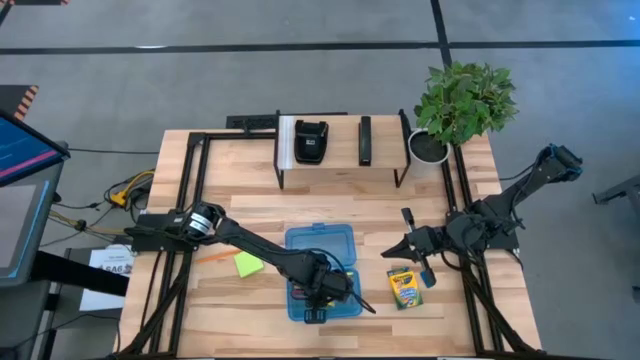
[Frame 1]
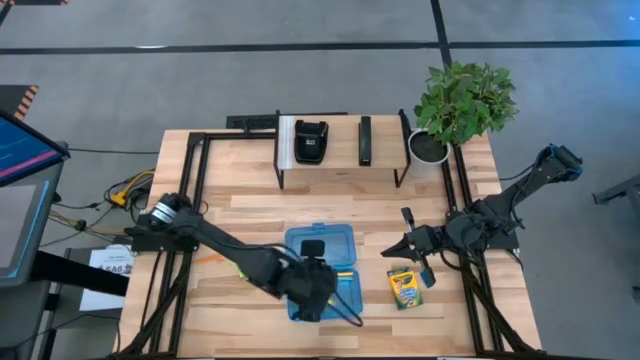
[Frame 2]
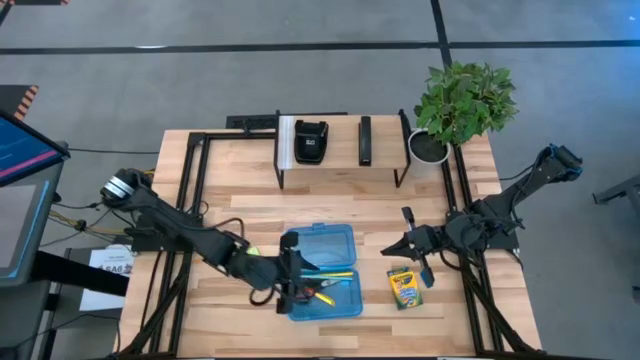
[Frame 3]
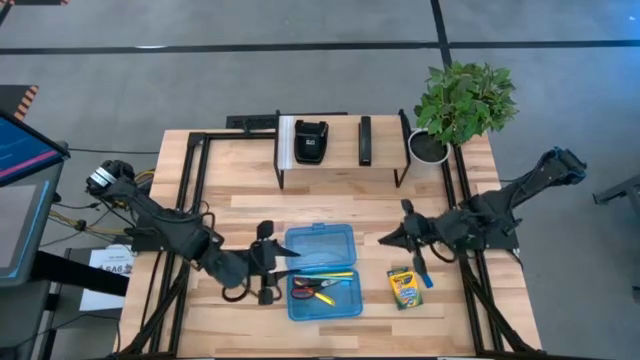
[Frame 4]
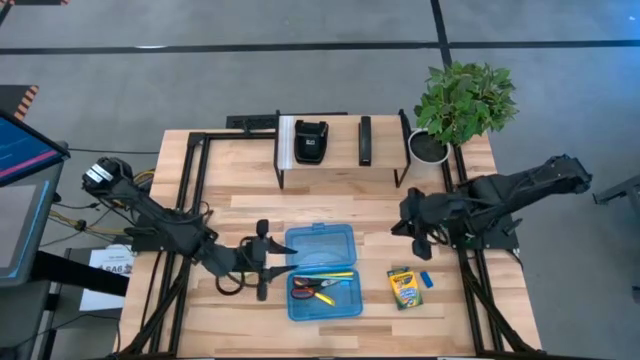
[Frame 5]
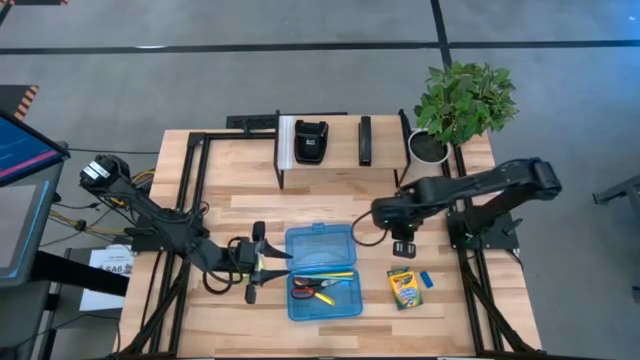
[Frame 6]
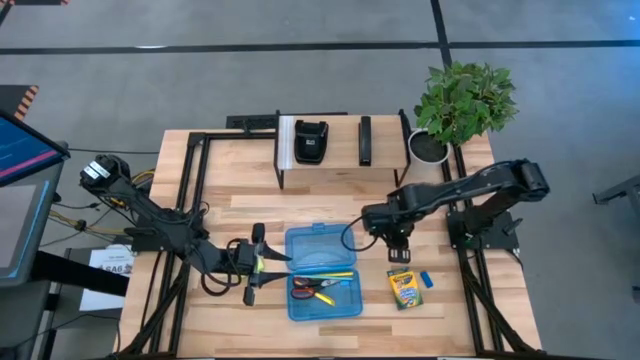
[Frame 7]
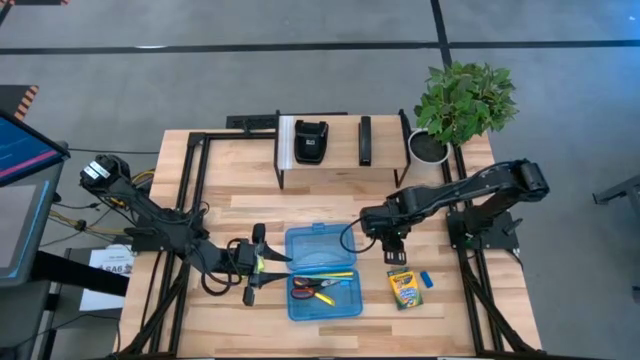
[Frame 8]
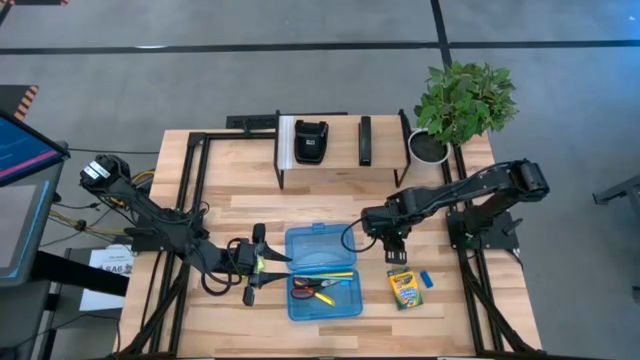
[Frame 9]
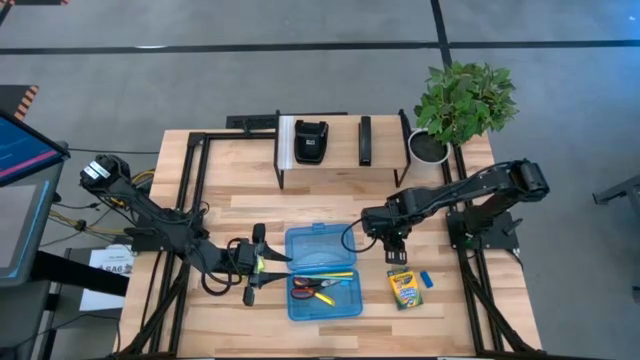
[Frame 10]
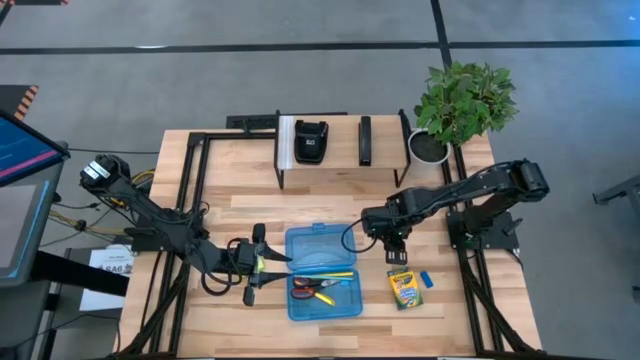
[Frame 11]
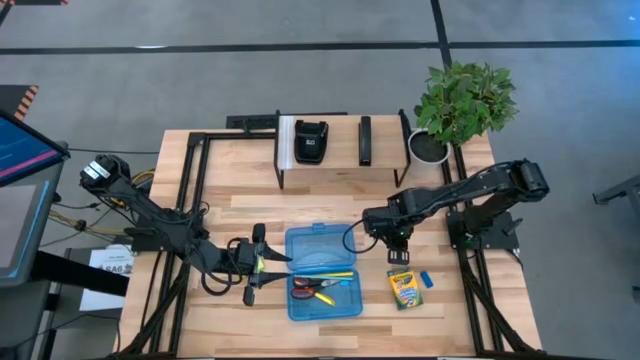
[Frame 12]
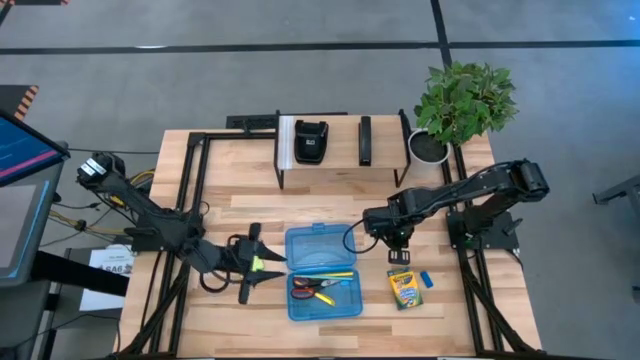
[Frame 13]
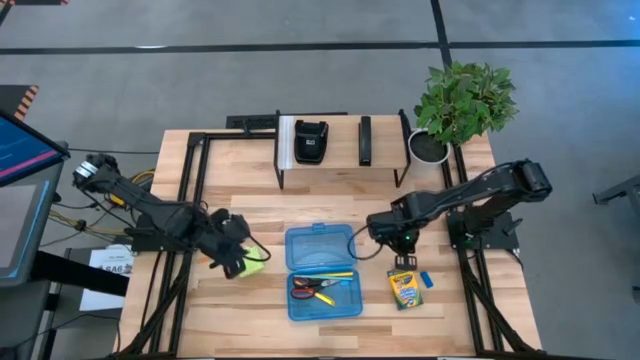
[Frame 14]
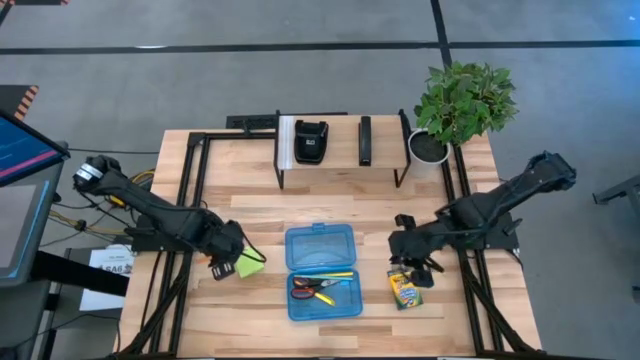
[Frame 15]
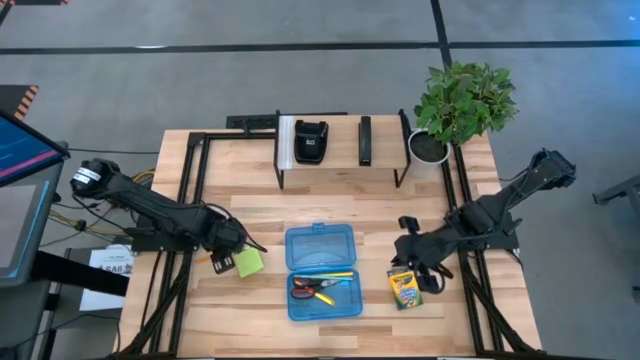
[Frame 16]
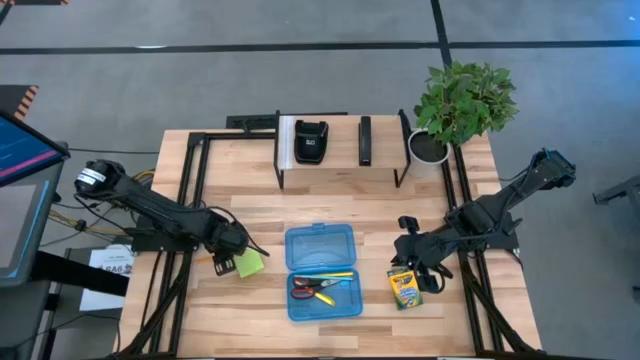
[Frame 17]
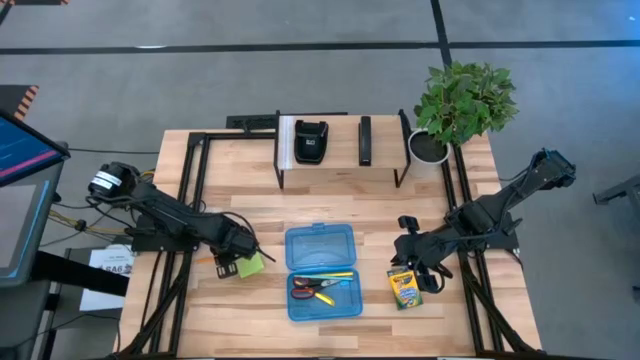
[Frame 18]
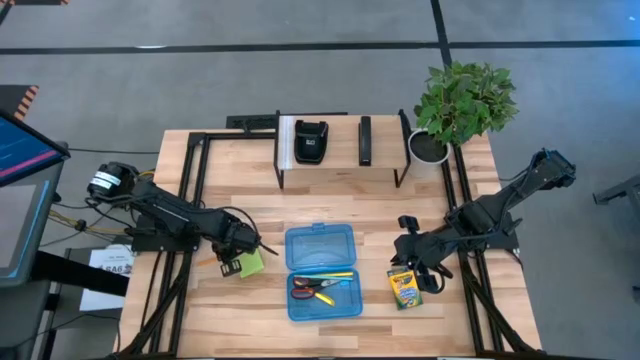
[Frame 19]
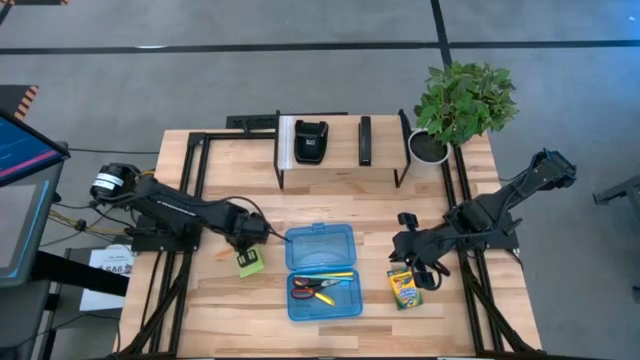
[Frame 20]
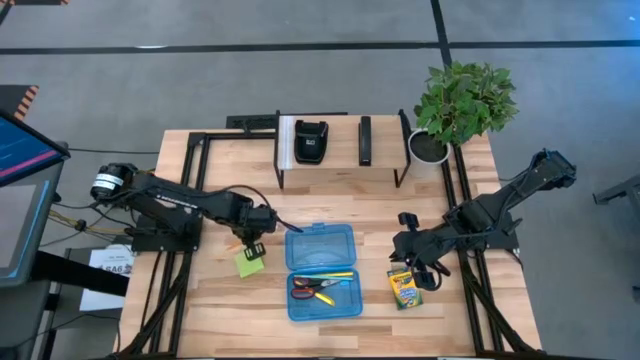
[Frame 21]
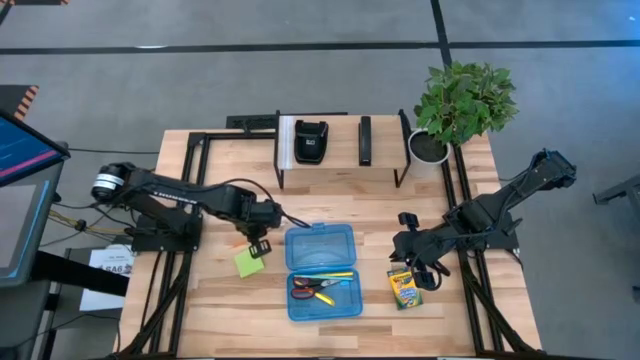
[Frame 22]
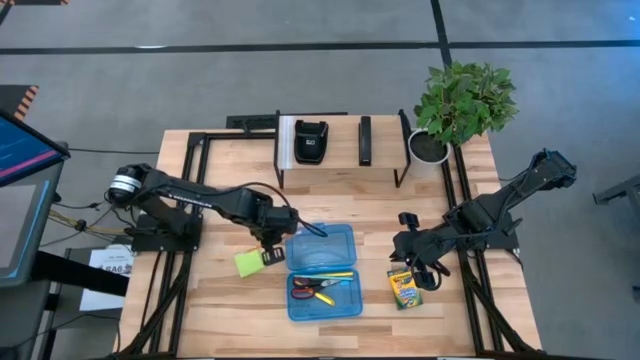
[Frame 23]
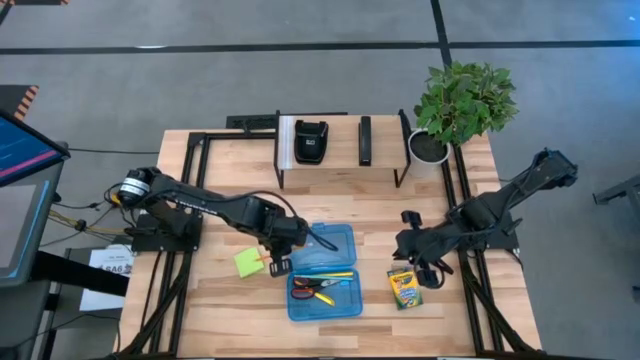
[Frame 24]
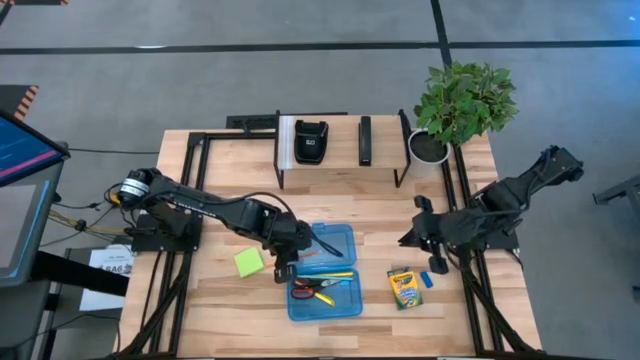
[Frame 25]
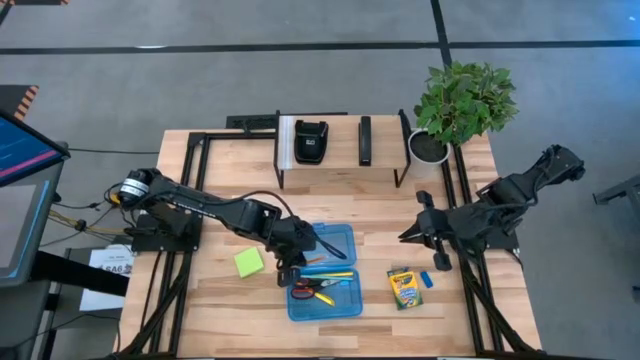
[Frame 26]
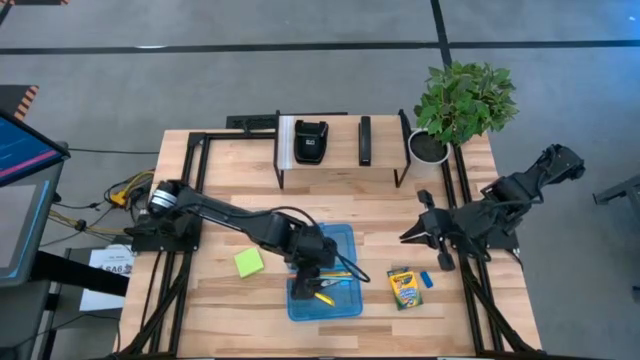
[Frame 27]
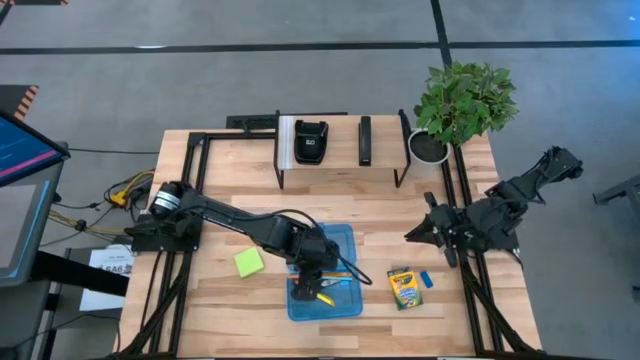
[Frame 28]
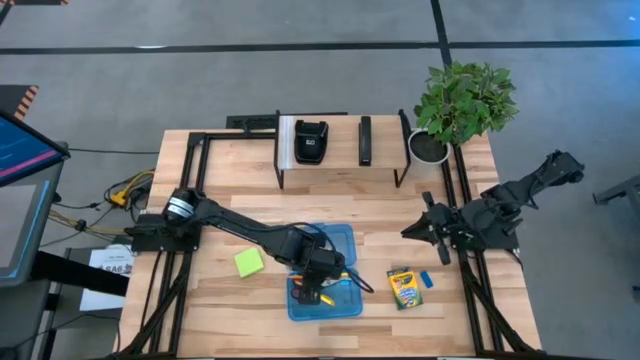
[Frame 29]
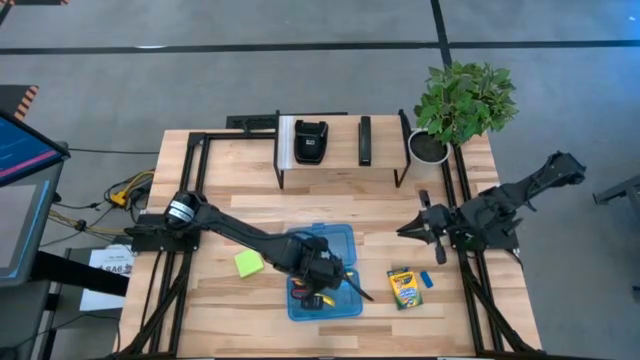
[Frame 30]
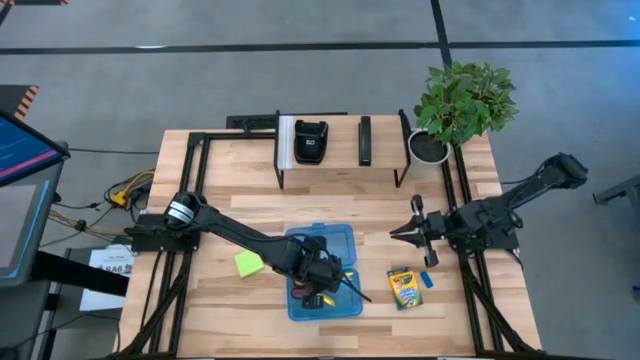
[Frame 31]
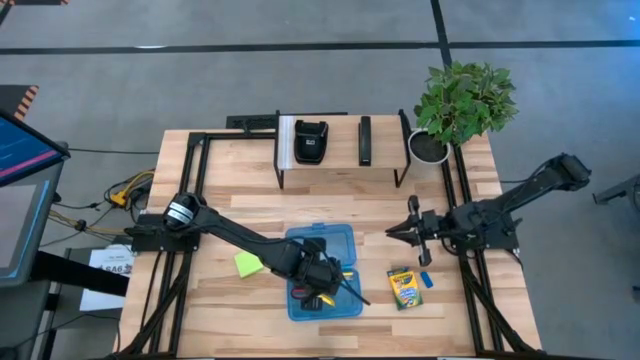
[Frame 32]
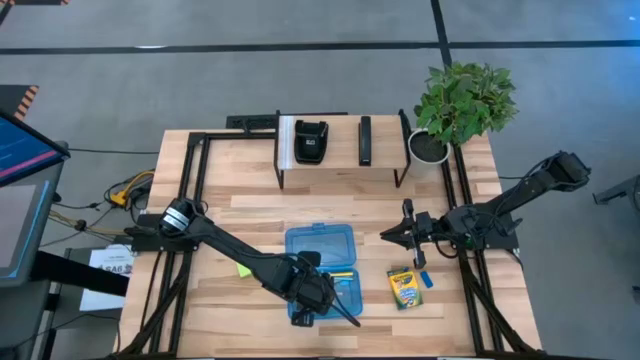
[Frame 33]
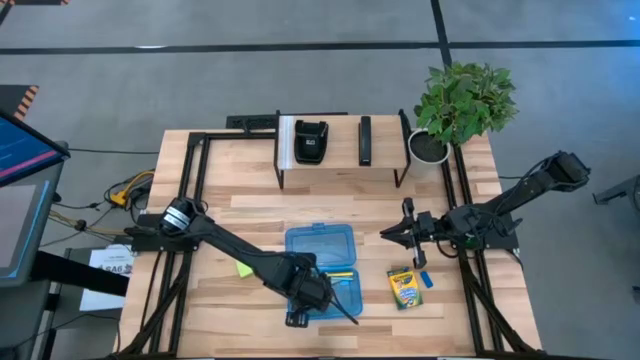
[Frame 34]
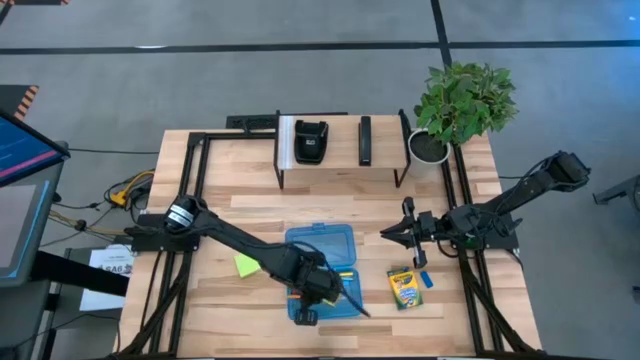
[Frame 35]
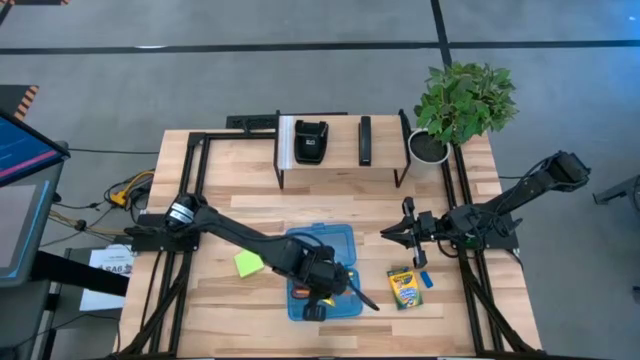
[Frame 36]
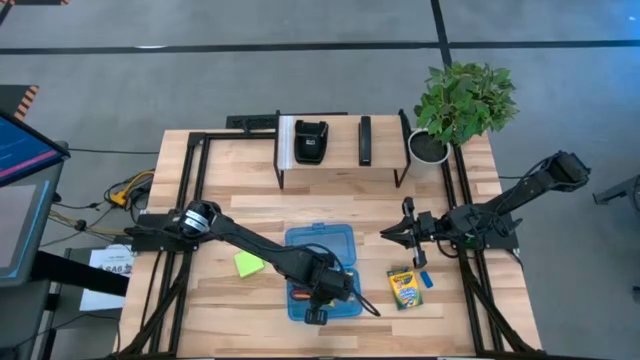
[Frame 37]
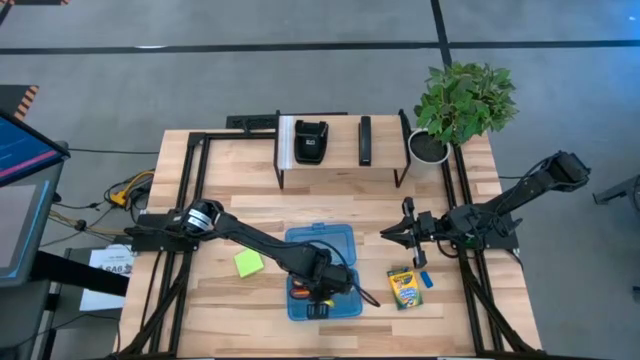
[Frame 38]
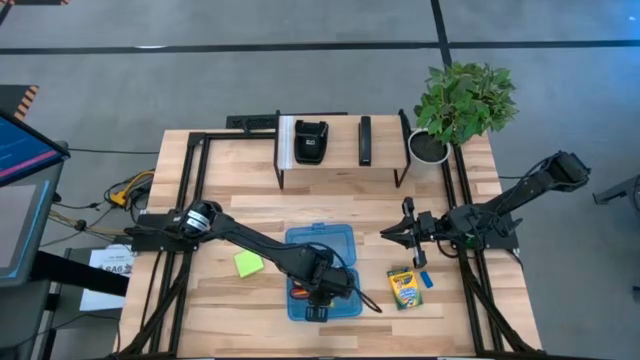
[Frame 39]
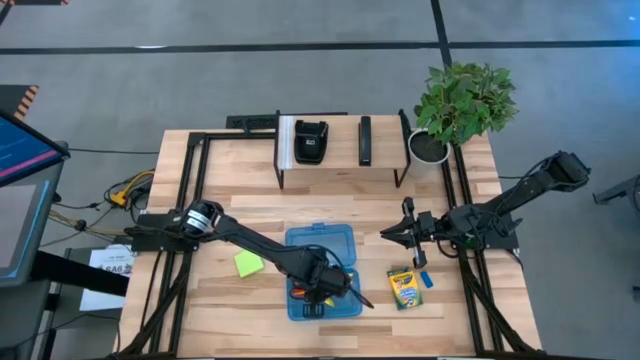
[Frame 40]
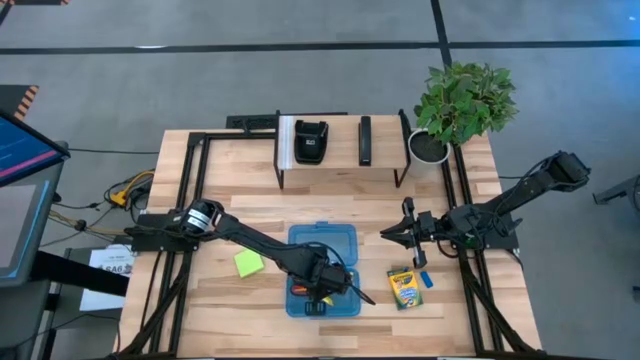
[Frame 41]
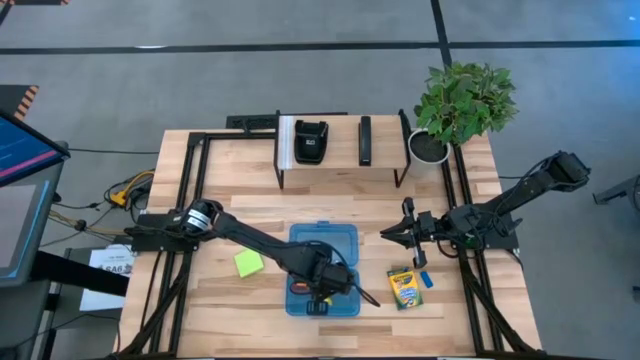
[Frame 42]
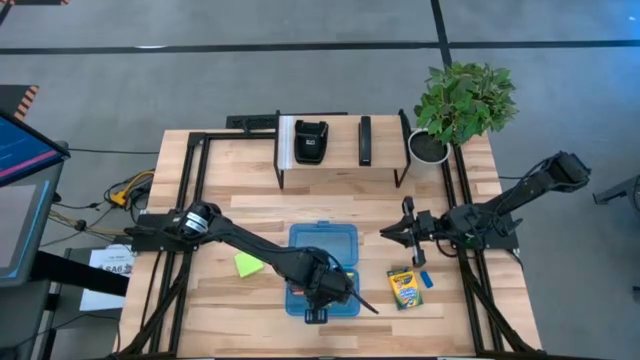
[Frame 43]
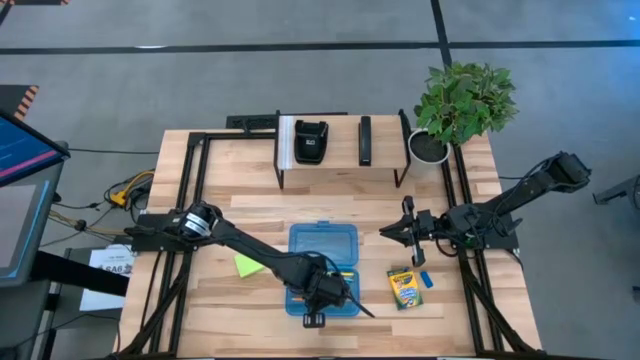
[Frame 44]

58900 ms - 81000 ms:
Task: Pack school essentials
Put the orange pencil into the blue supply box
